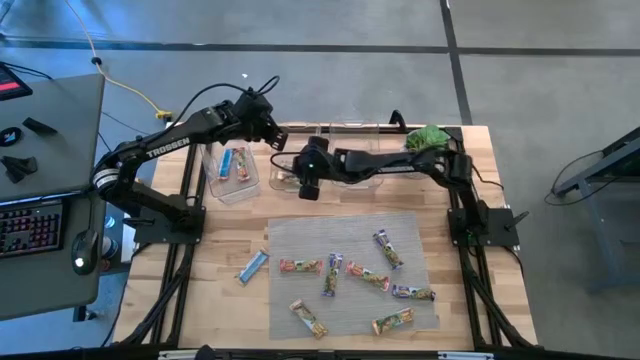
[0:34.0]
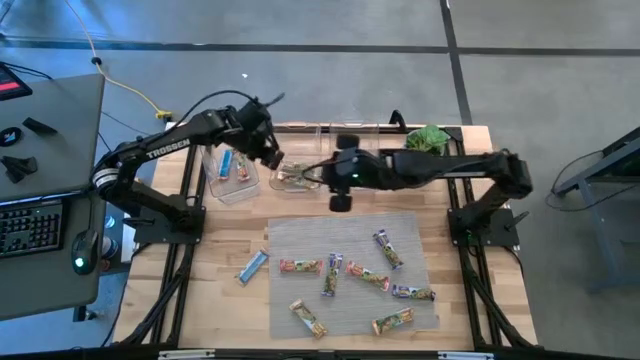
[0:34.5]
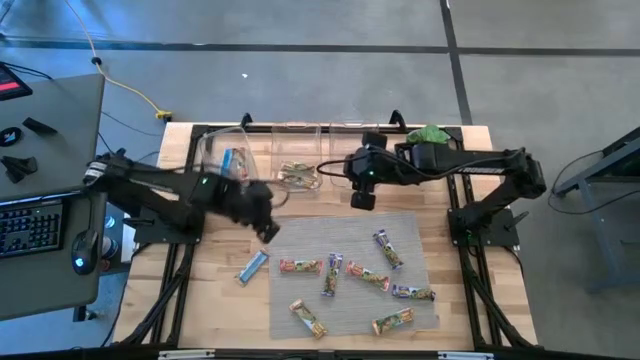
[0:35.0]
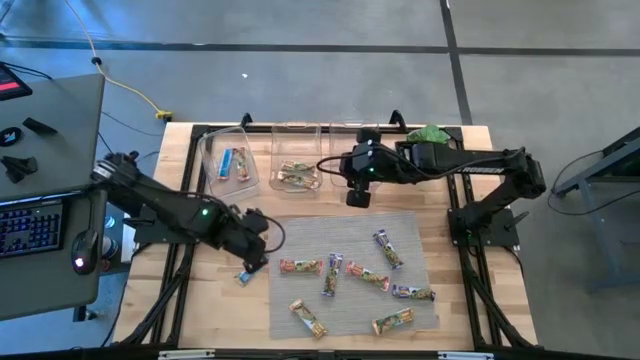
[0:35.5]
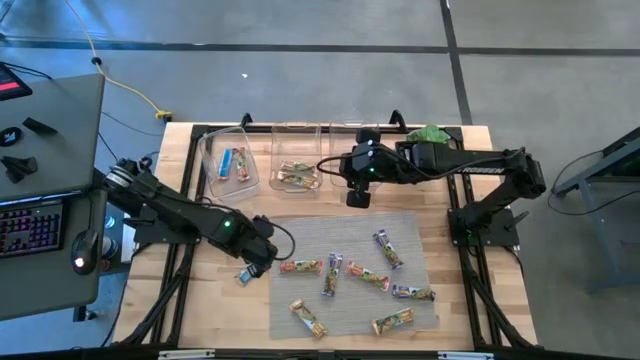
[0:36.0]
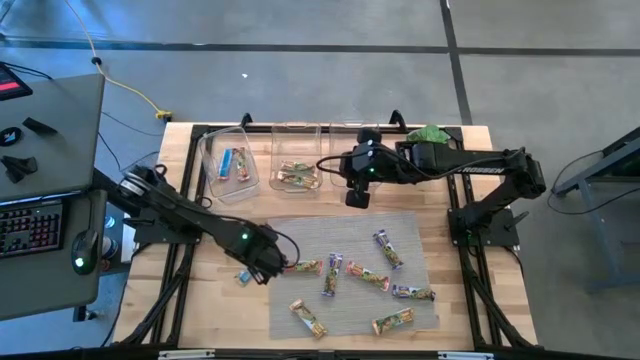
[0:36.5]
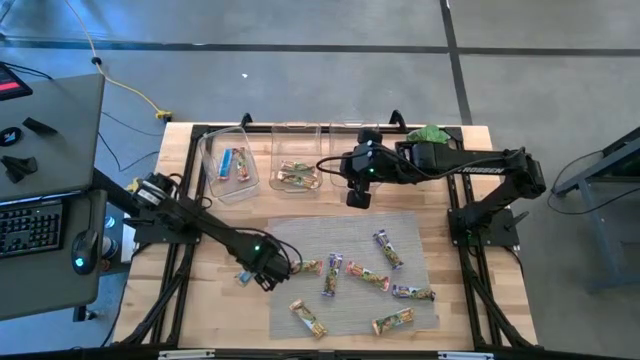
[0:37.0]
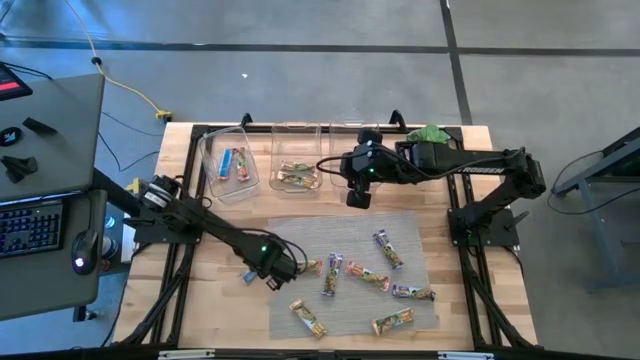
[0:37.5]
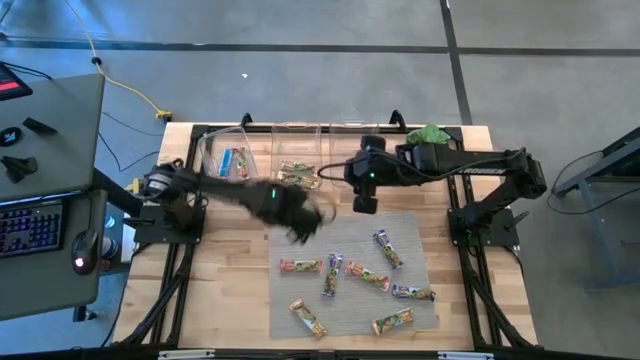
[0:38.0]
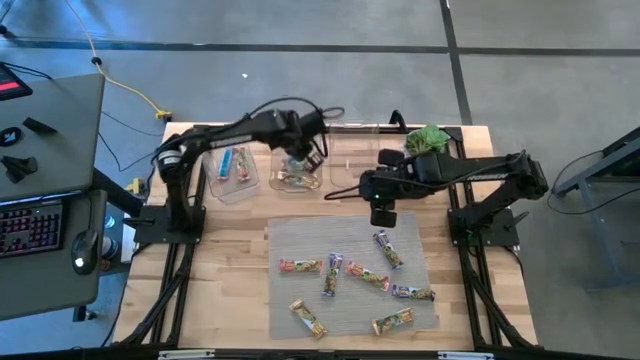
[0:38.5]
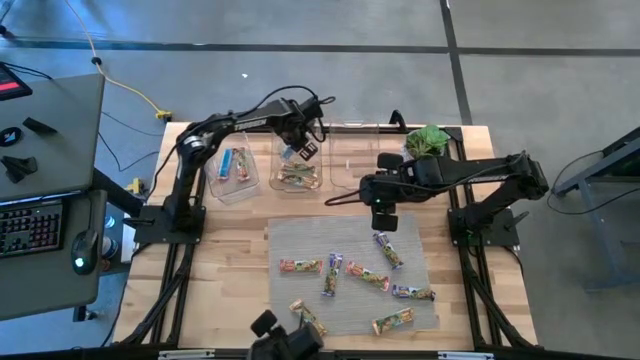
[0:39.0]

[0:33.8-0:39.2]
Task: Pick and place Granola Bars by type
Put the yellow granola bar into the middle transparent bin

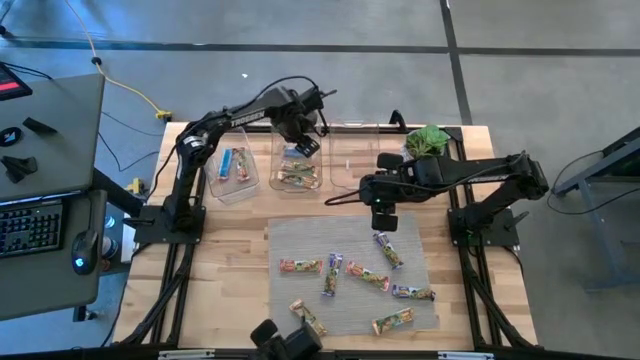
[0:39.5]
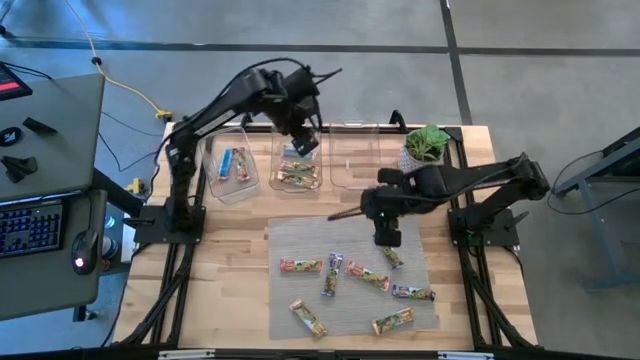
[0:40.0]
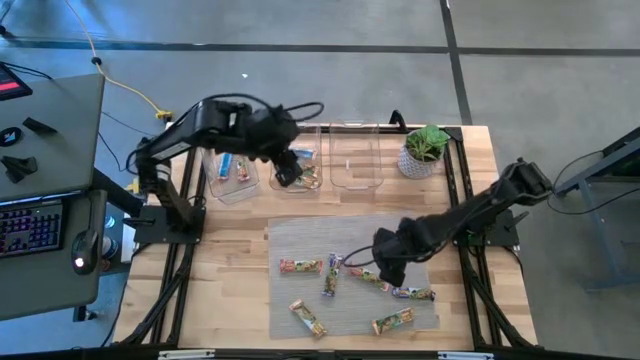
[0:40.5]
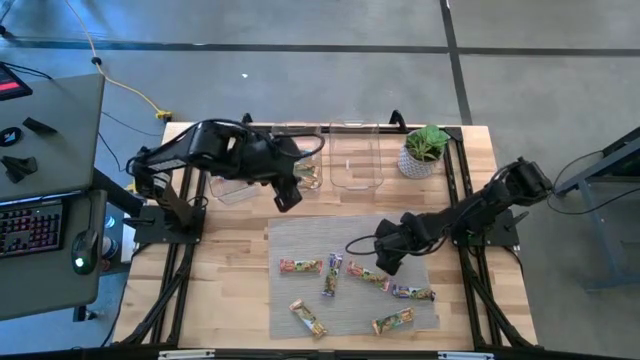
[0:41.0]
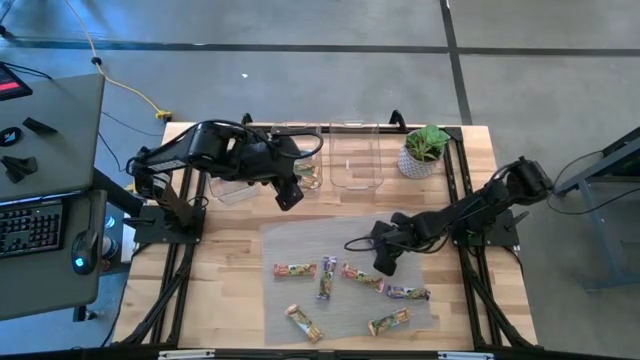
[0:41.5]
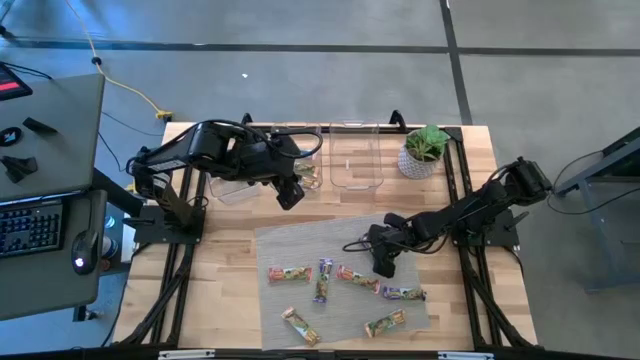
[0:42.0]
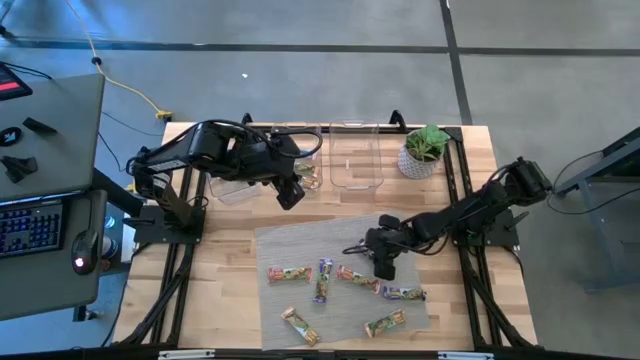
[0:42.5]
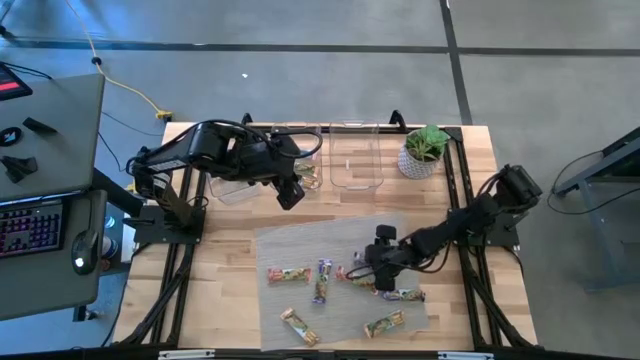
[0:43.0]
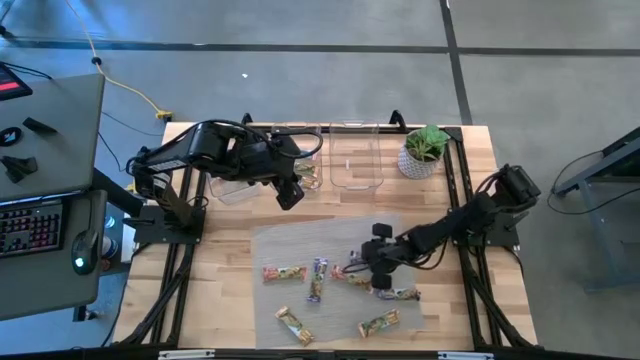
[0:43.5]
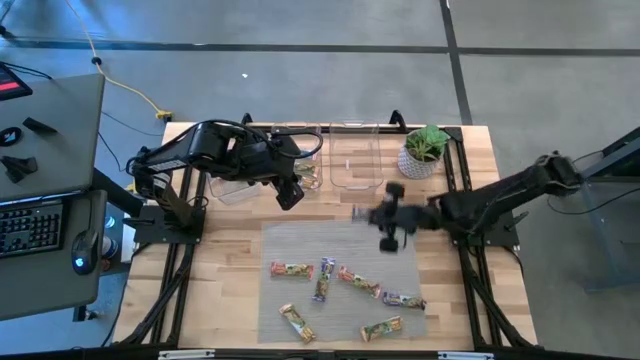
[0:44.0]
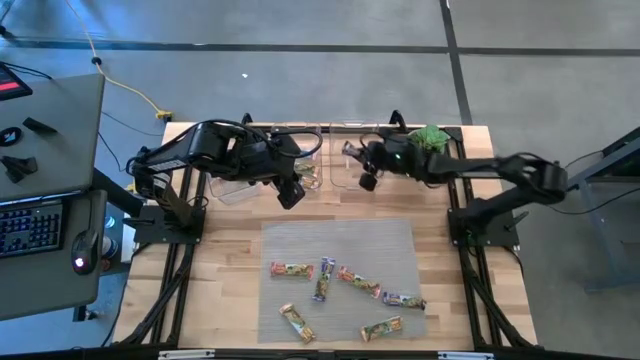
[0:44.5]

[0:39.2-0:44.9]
Put the blue granola bar into the right transparent bin

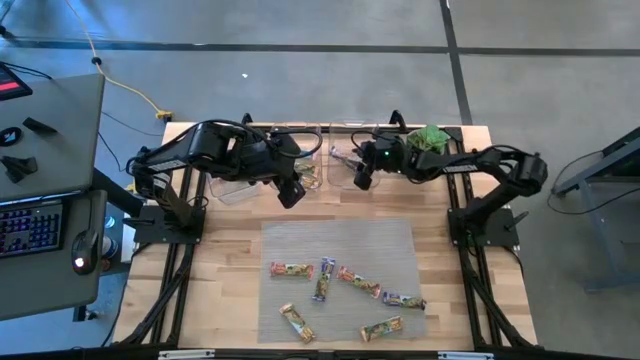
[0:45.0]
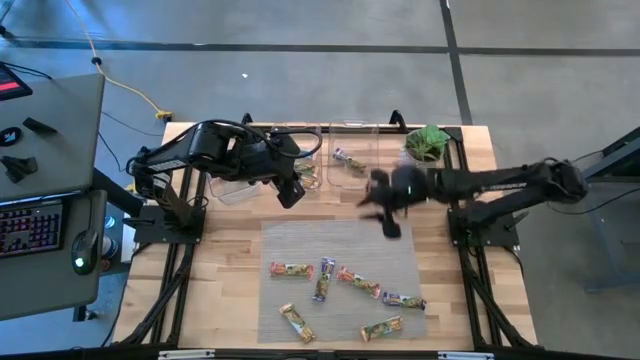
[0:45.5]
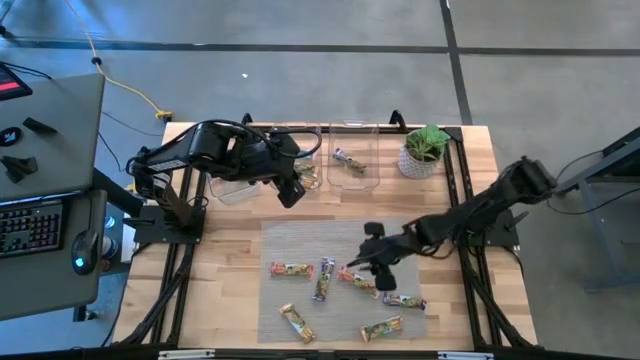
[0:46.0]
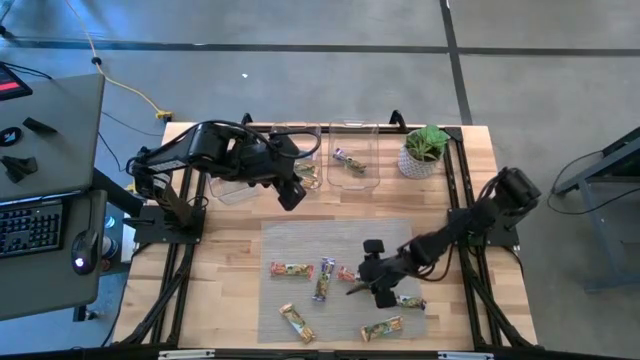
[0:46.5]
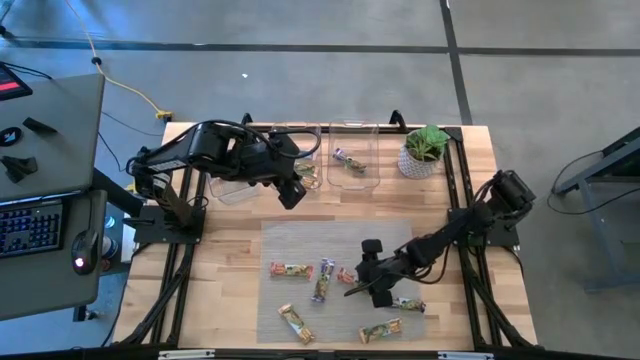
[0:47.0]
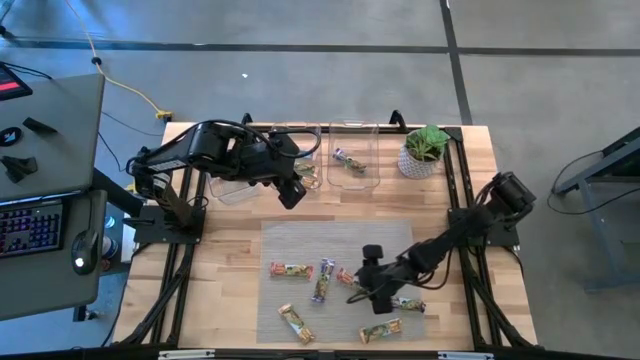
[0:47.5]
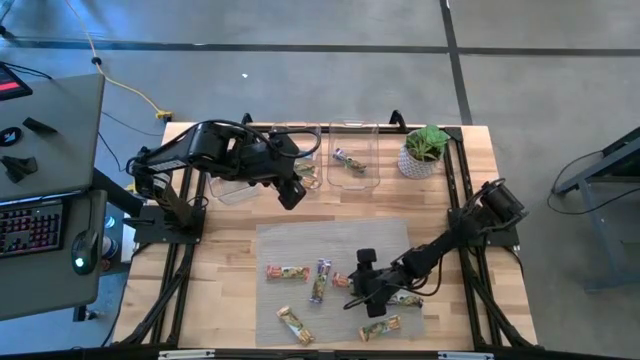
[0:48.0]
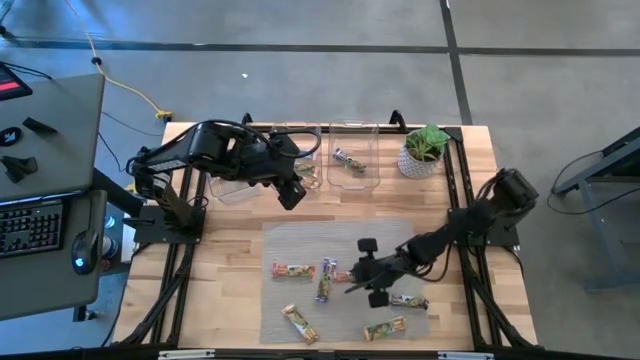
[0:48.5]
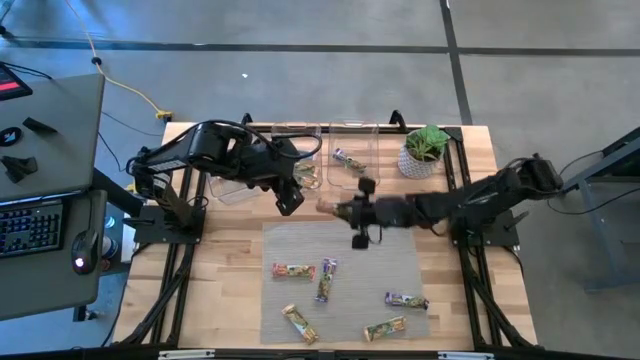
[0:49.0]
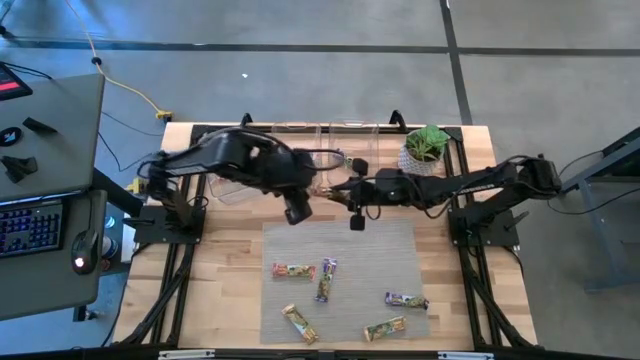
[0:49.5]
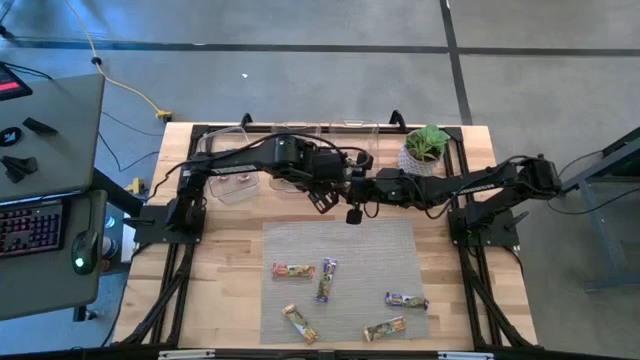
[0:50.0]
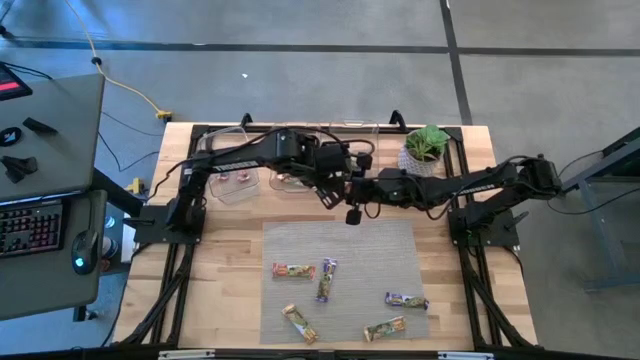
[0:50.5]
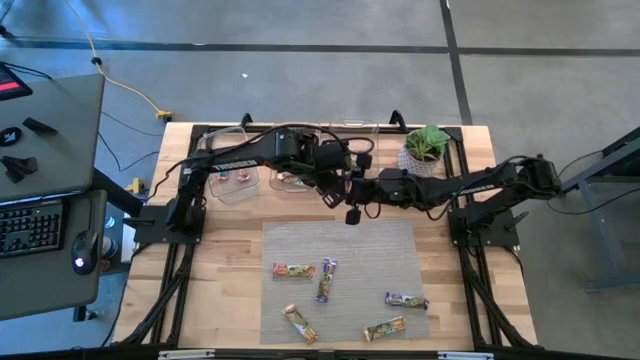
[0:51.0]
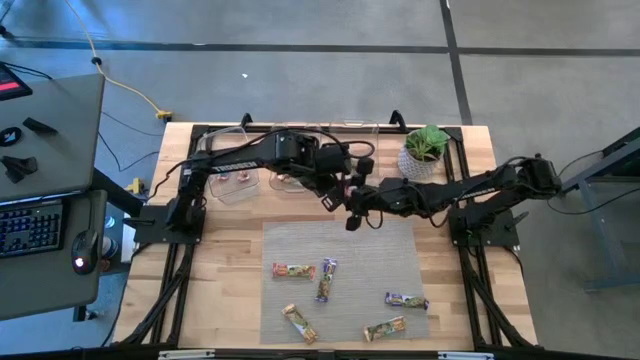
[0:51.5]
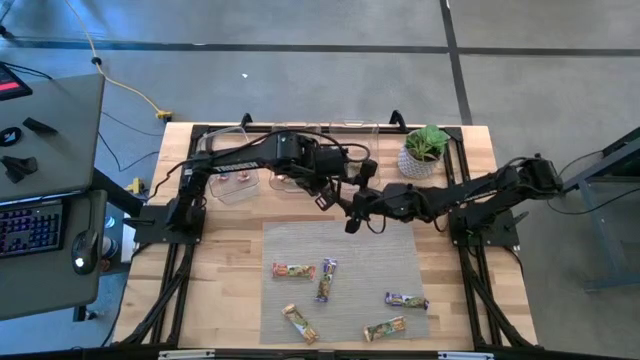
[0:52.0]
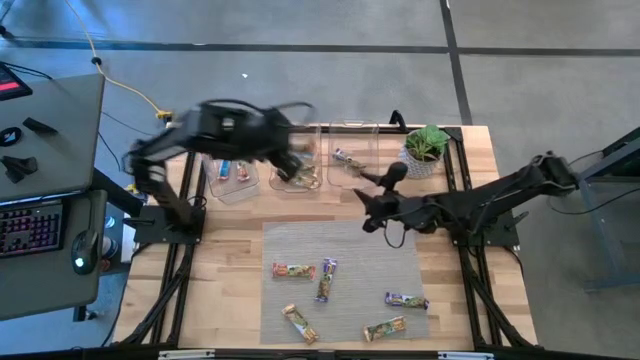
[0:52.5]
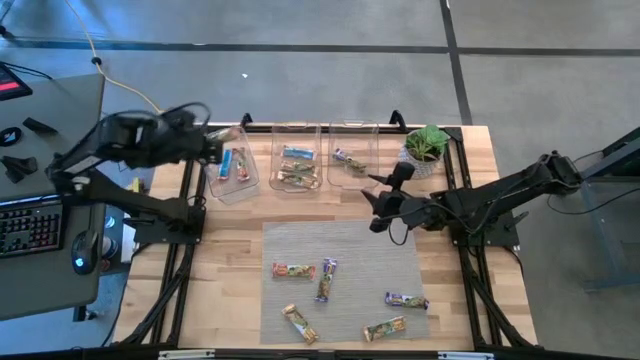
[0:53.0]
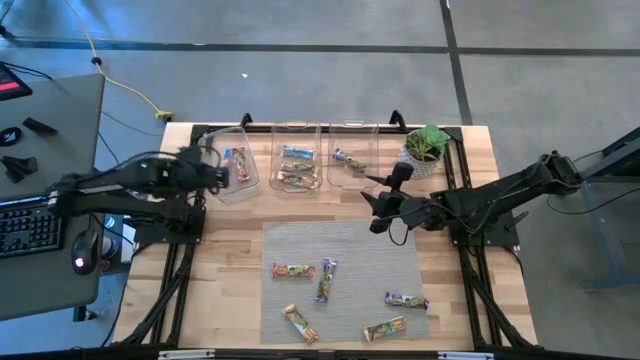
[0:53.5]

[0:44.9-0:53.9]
Put the red granola bar into the left transparent bin

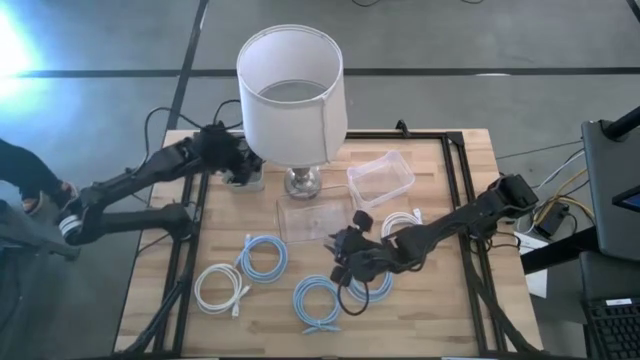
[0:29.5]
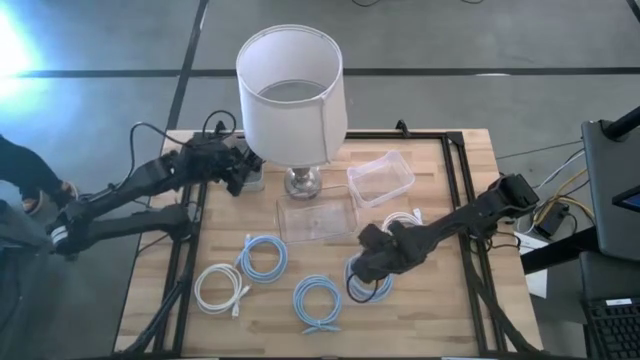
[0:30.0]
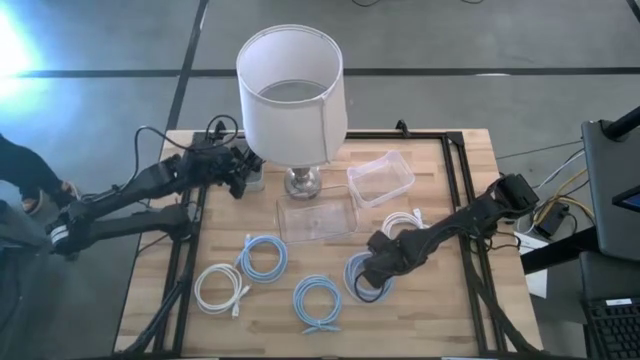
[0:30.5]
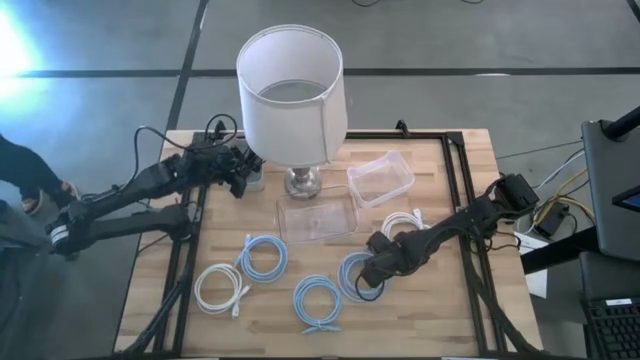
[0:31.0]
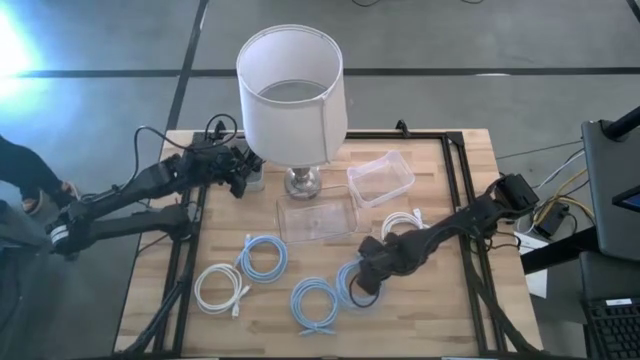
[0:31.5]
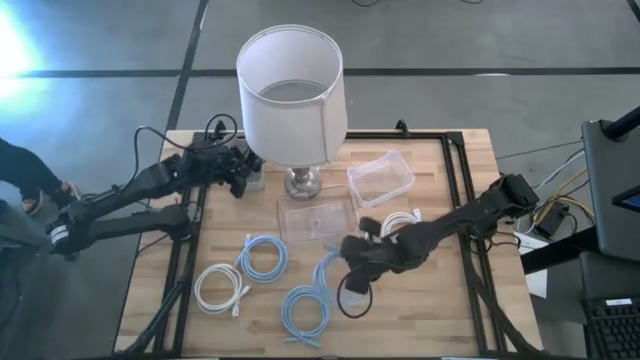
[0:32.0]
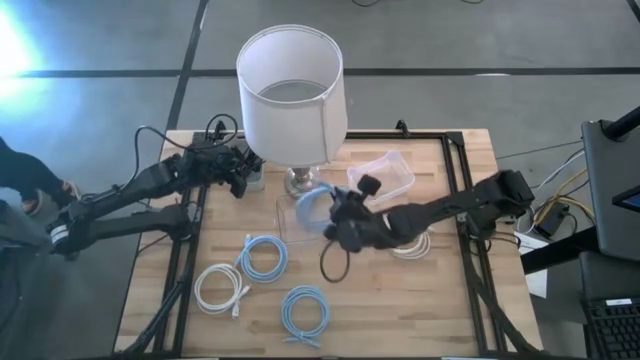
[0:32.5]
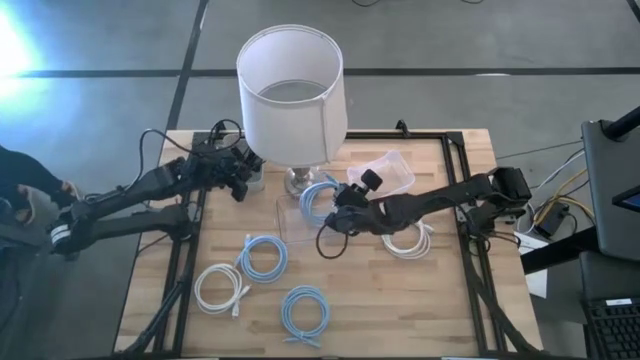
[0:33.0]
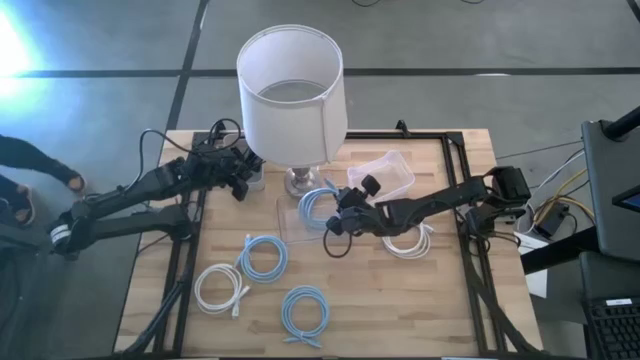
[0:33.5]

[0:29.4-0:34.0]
Task: Pick & Place USB Port
Put the bottom right blue hdmi cable into the left transparent bin
